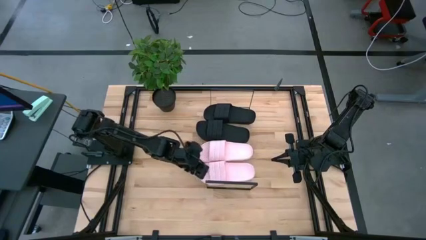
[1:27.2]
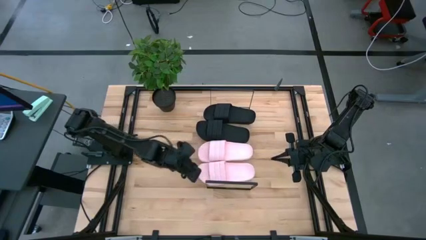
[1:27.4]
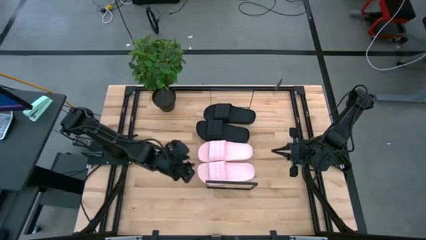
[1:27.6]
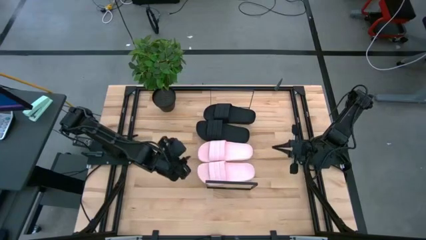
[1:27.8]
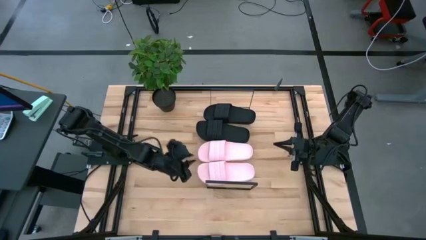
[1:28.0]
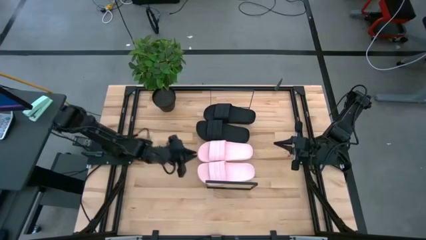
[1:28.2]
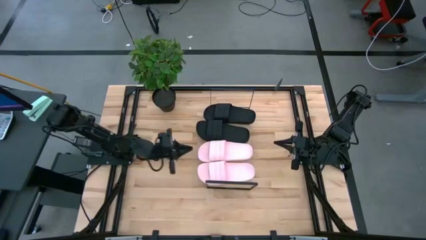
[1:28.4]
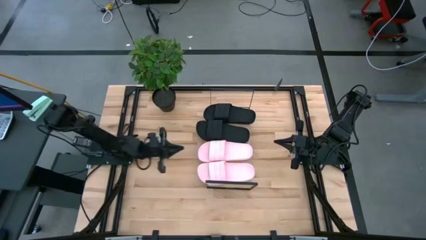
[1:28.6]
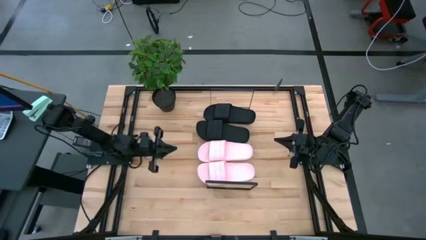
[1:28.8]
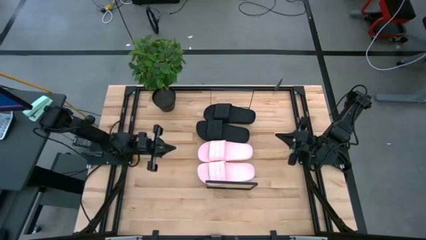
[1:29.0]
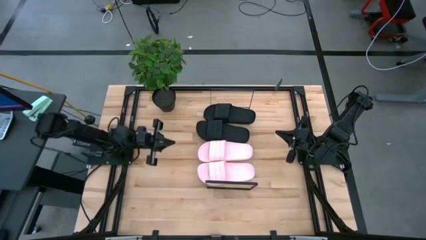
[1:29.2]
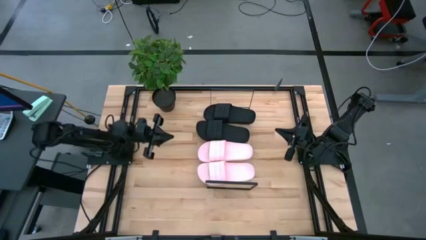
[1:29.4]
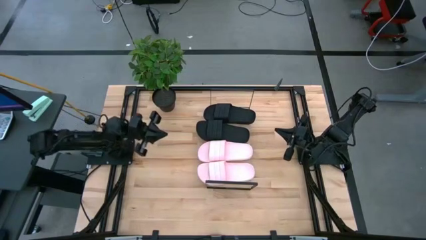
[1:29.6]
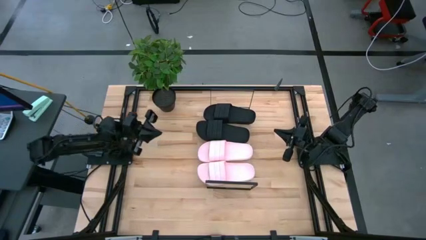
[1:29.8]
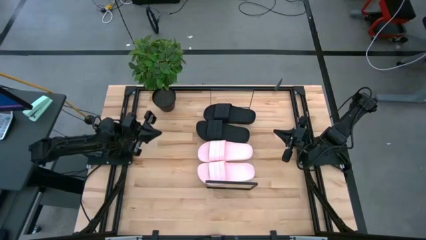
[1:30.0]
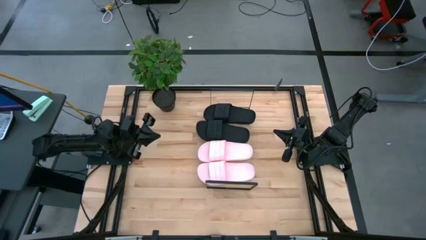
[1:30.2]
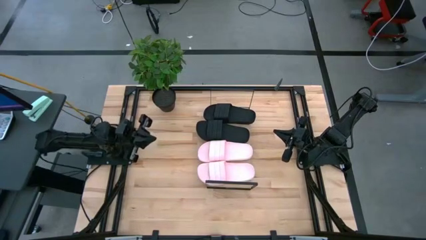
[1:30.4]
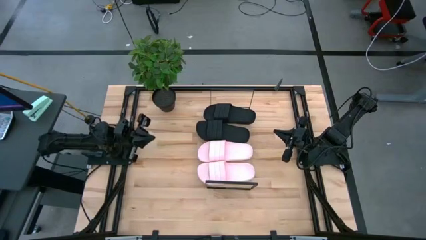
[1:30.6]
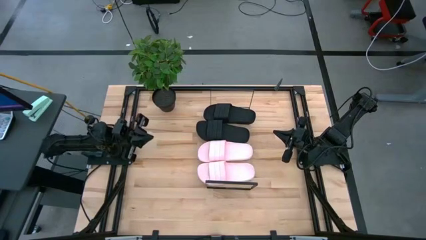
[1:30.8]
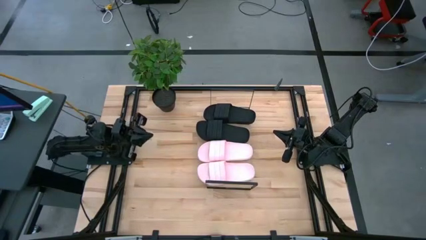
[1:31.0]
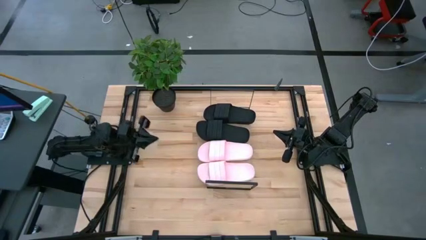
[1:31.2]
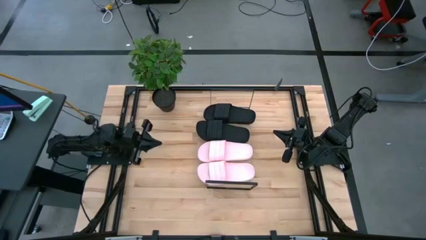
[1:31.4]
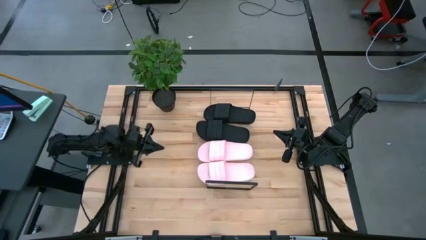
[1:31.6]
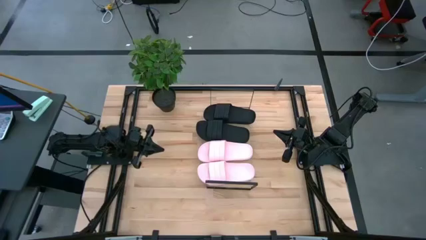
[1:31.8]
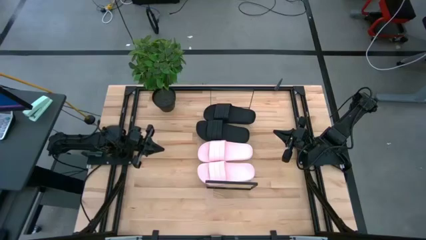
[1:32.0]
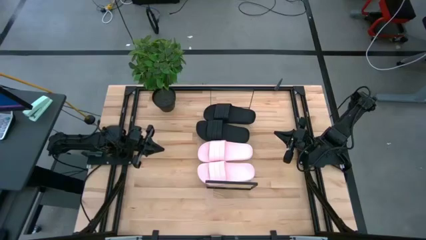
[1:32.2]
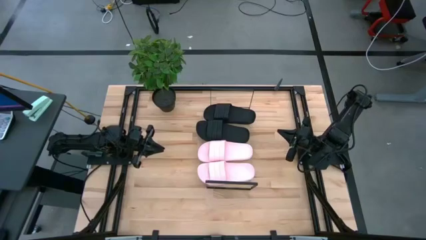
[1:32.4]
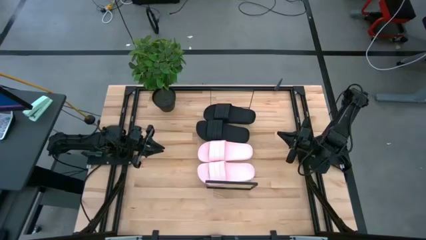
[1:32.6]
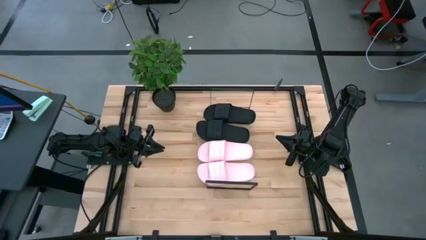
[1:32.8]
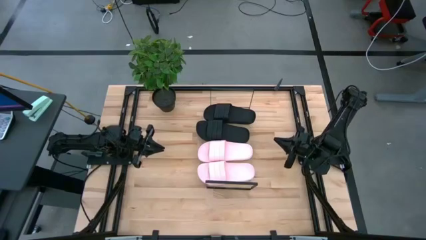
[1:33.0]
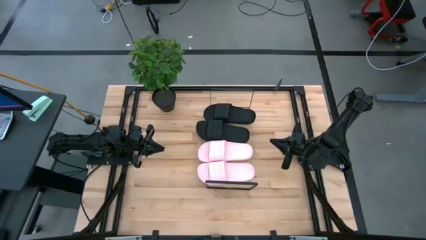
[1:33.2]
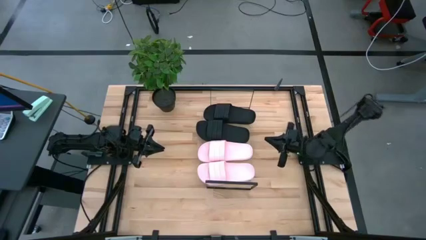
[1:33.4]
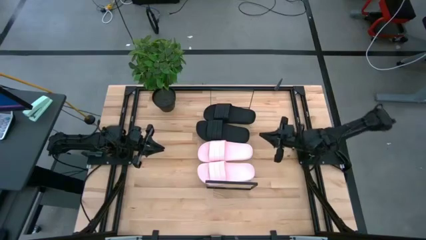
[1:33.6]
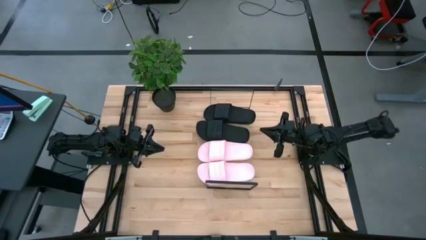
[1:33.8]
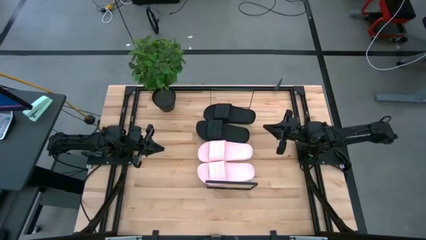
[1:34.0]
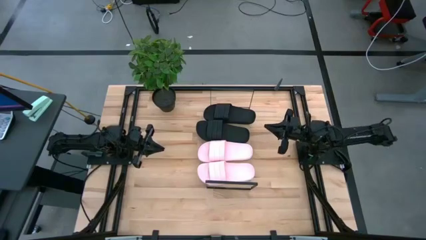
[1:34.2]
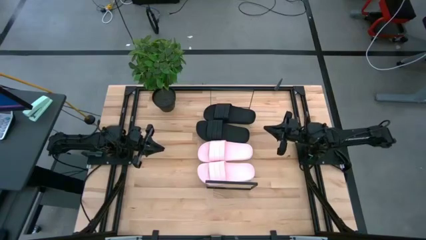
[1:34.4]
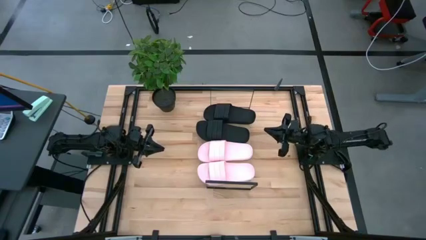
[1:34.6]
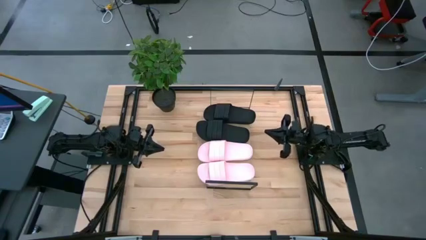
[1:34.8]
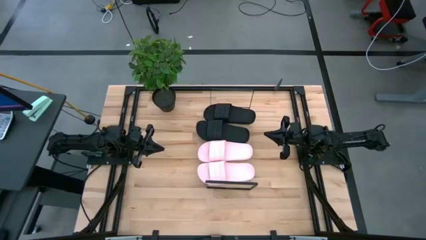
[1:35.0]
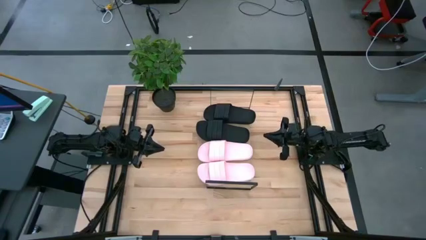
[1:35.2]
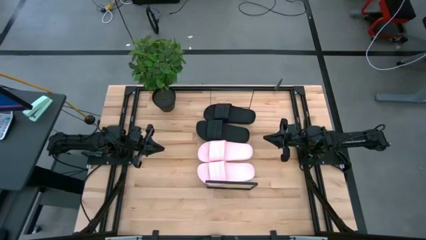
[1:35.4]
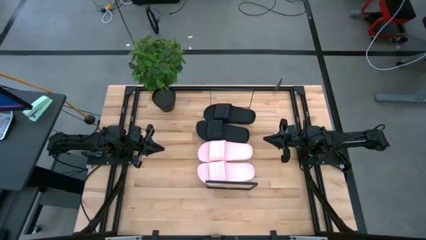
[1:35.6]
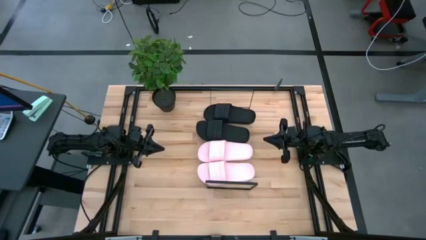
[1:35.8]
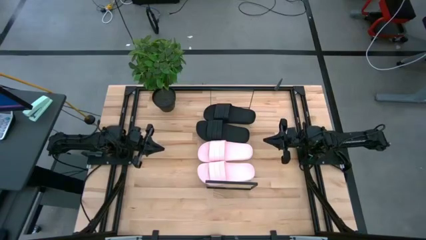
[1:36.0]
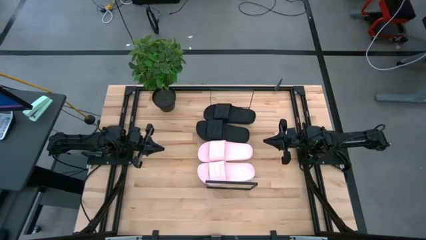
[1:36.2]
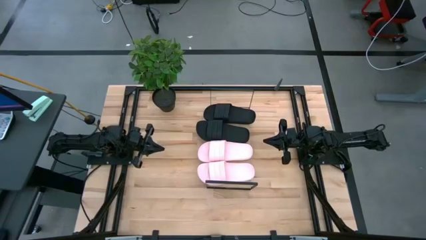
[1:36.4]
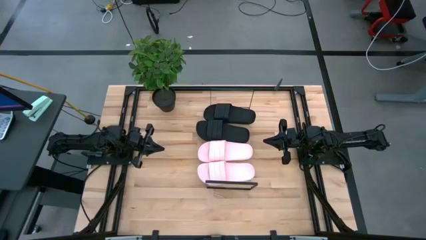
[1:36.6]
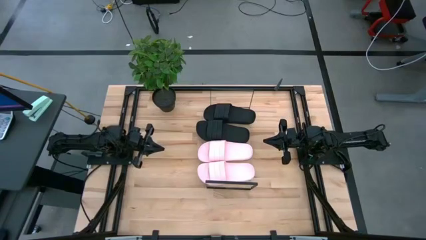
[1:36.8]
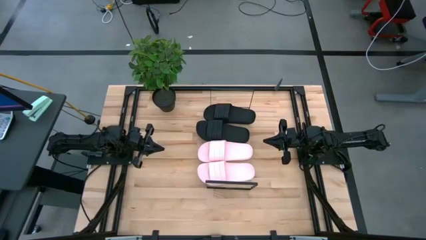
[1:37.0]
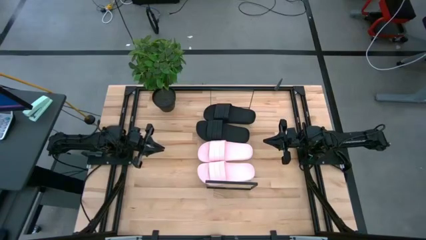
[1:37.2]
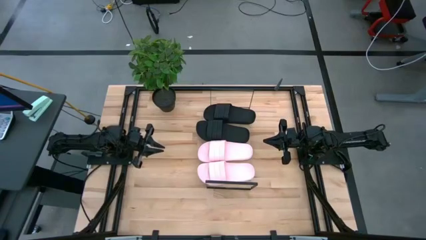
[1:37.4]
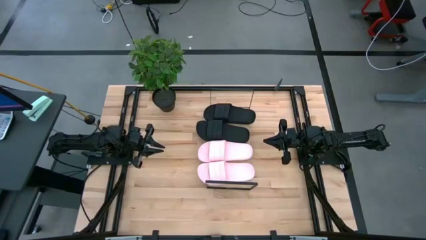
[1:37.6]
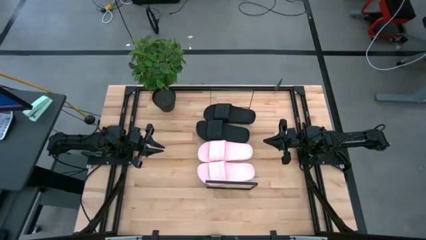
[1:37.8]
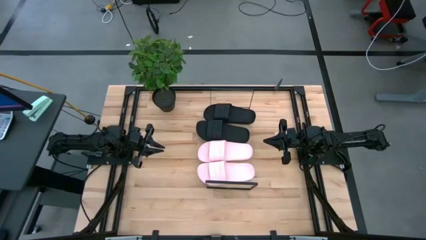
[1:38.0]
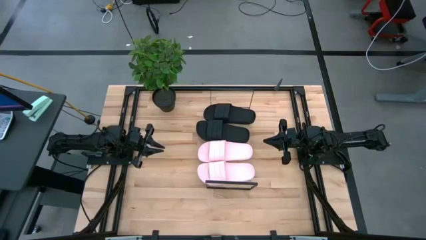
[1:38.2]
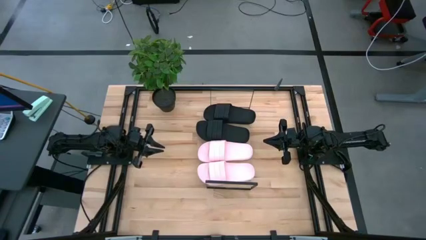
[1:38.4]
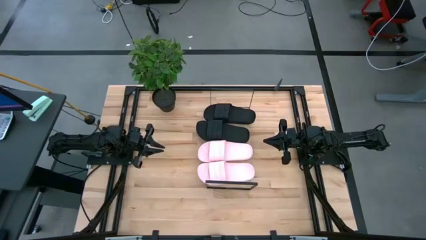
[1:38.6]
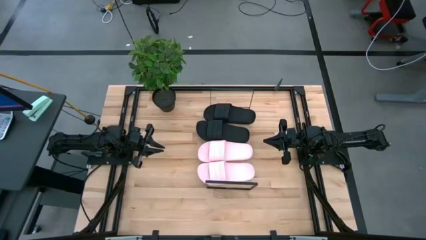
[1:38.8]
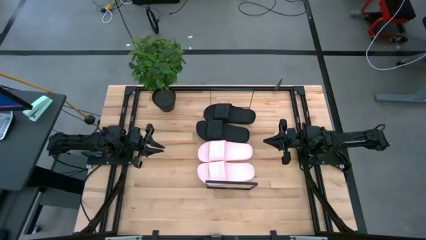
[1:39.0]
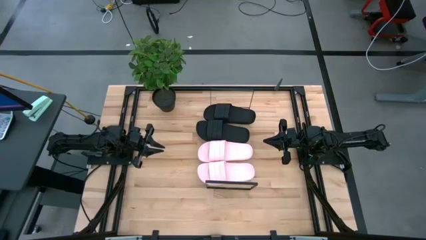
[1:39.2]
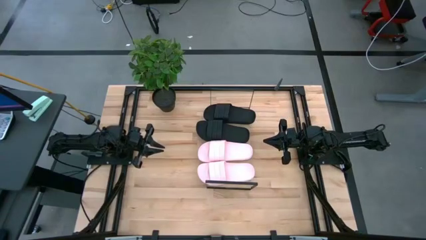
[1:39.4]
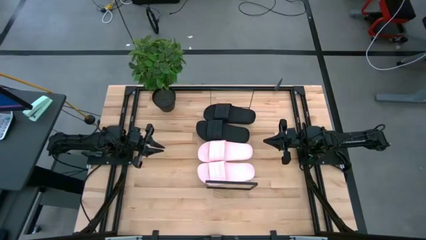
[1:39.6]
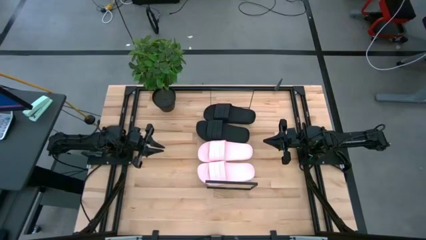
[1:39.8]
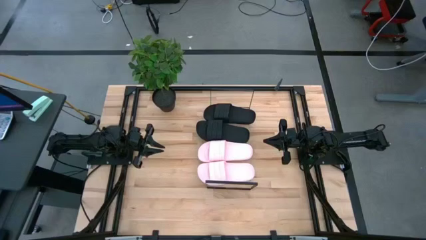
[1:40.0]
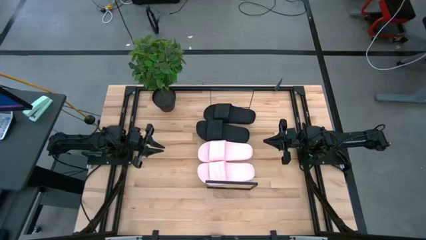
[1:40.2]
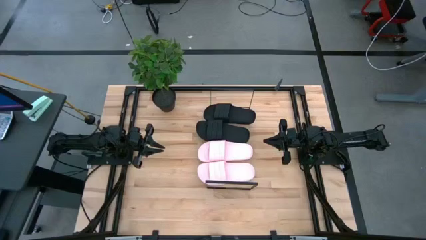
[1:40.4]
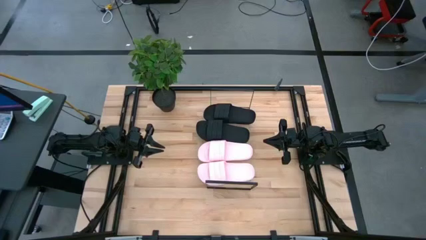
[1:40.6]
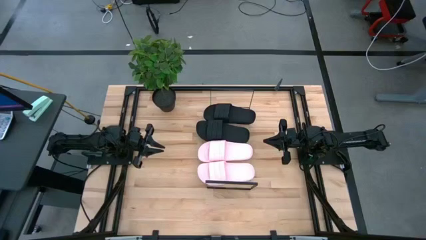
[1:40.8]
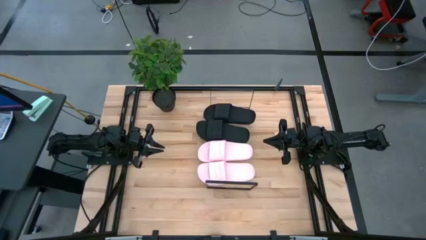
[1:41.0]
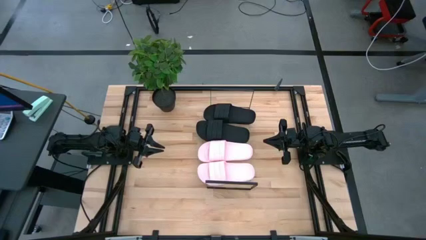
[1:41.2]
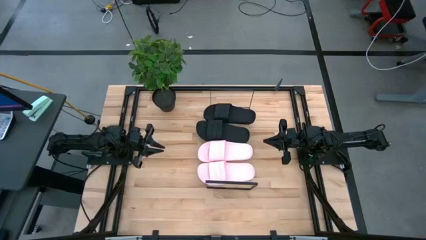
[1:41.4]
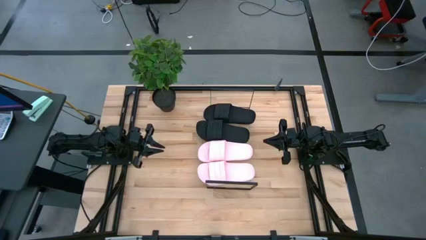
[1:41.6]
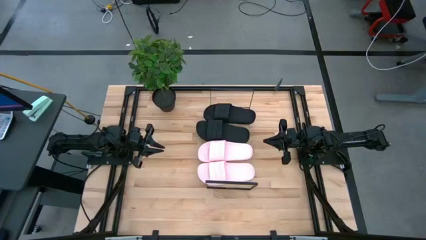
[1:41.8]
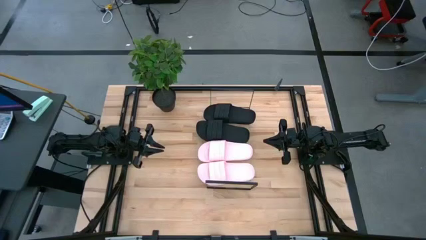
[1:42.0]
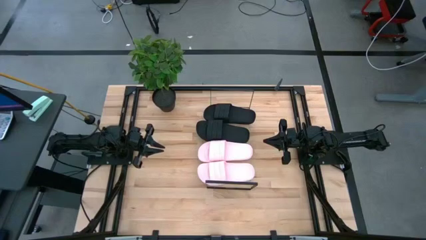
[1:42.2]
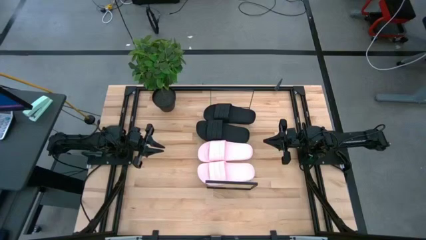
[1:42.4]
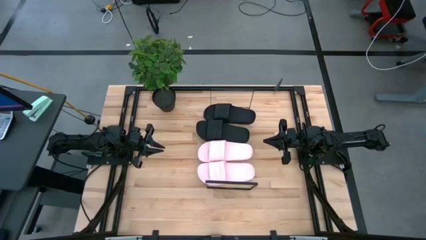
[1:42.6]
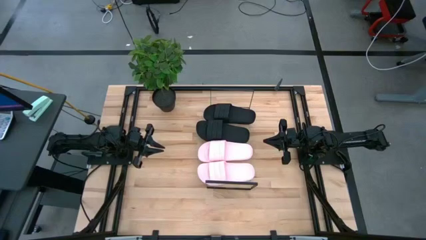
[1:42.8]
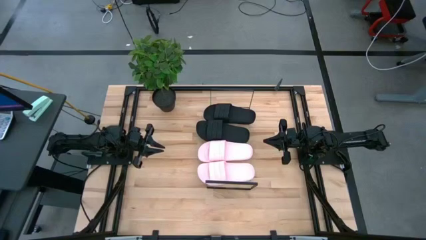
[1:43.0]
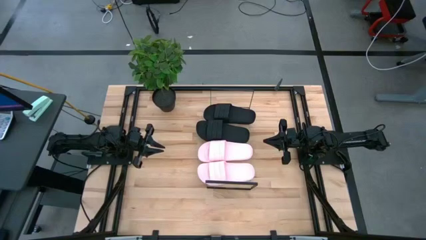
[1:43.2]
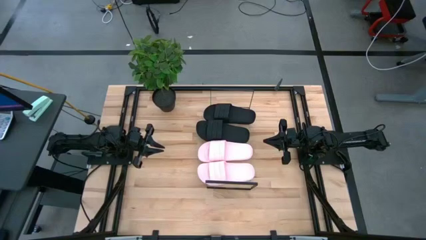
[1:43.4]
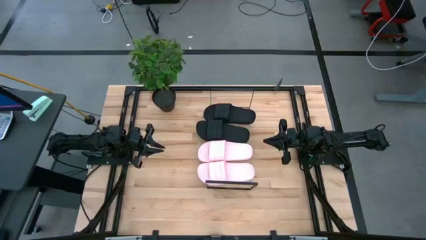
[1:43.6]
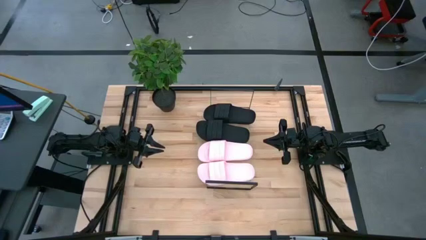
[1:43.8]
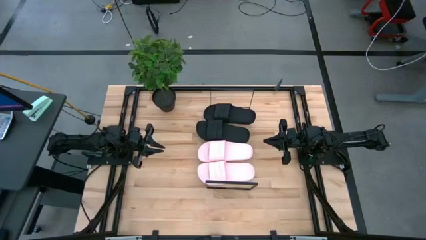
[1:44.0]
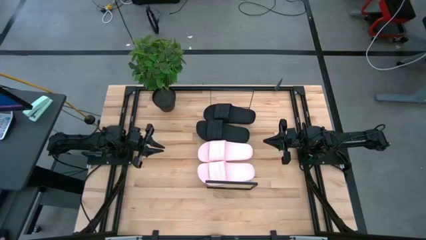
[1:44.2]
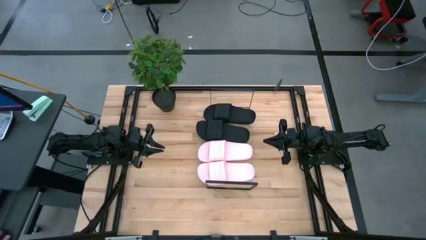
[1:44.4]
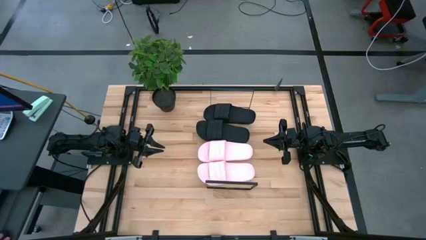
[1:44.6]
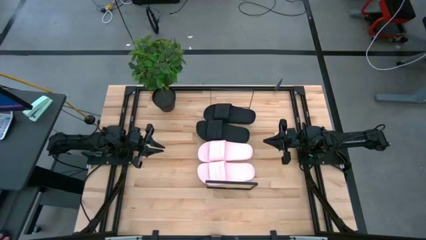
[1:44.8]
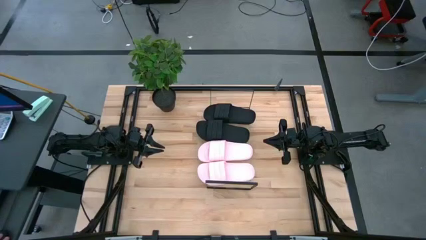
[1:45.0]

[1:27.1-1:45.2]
Task: Pick and place slides into the shelf
Return to Home Position
